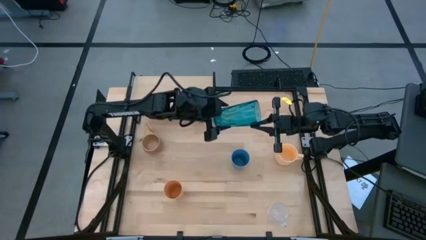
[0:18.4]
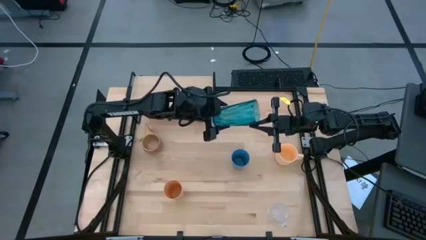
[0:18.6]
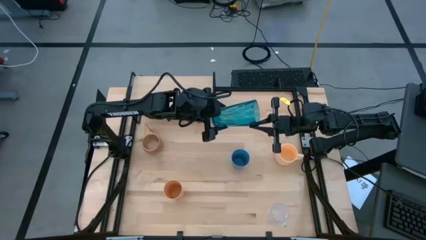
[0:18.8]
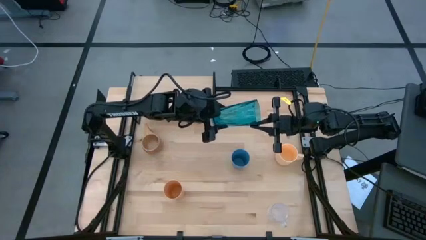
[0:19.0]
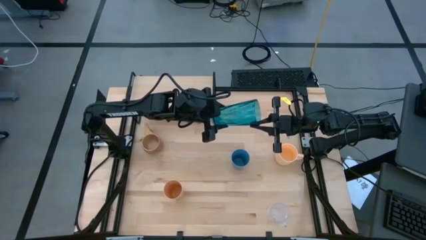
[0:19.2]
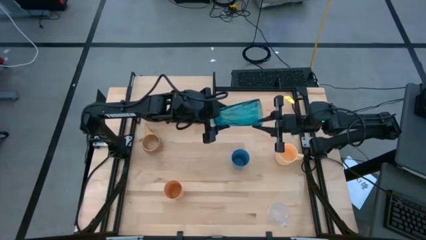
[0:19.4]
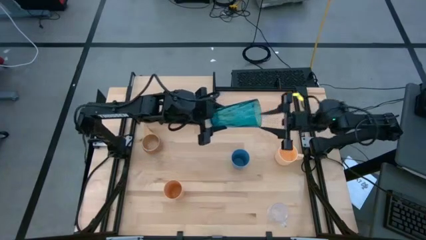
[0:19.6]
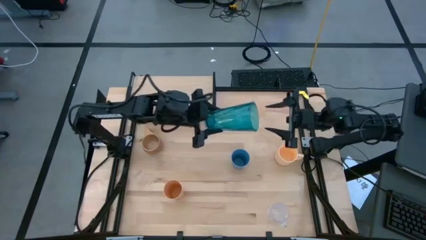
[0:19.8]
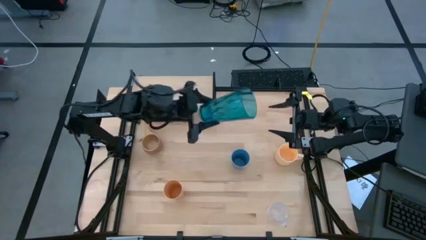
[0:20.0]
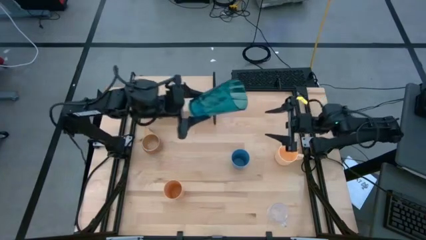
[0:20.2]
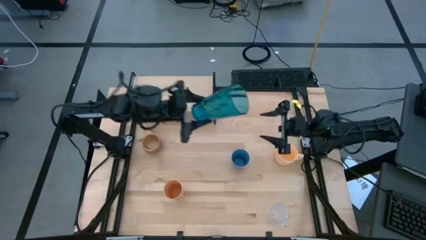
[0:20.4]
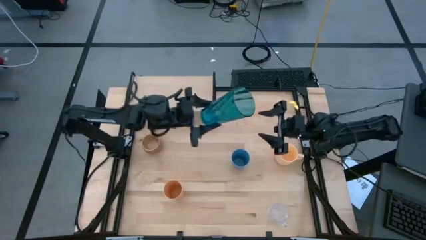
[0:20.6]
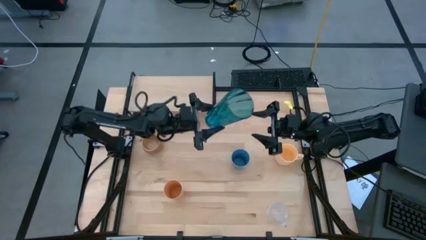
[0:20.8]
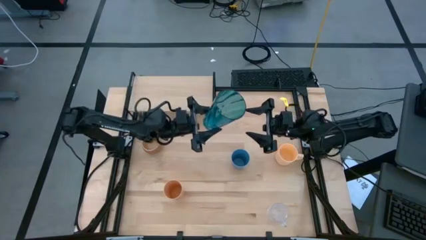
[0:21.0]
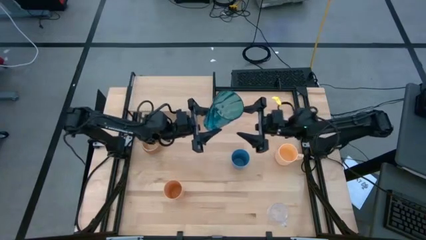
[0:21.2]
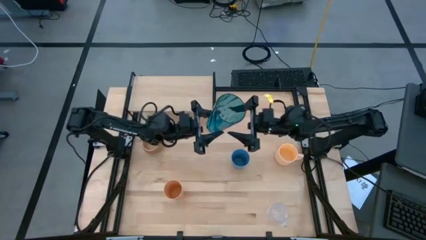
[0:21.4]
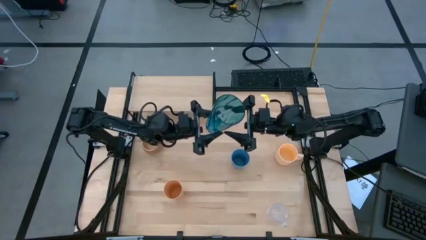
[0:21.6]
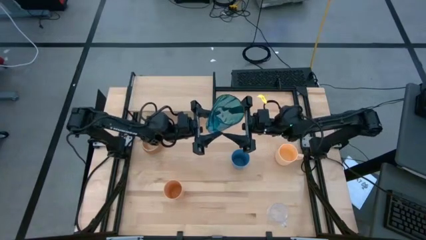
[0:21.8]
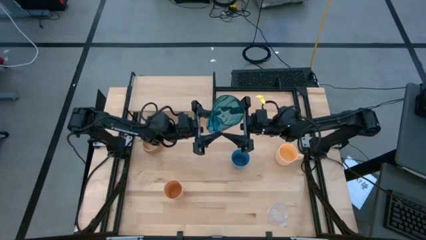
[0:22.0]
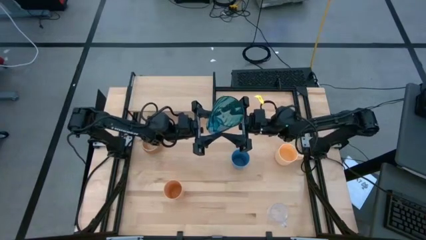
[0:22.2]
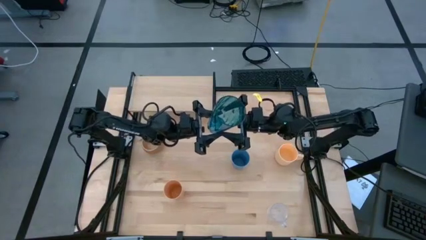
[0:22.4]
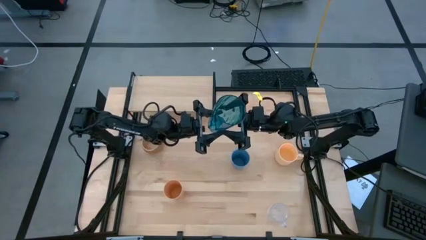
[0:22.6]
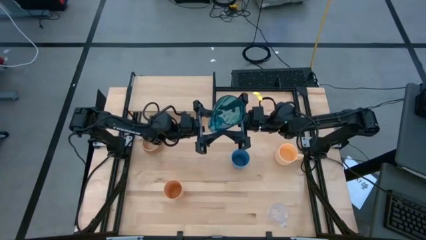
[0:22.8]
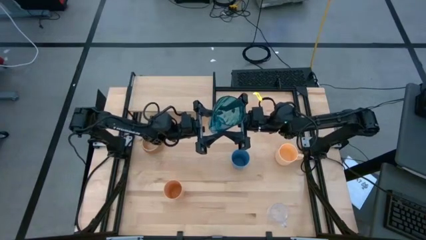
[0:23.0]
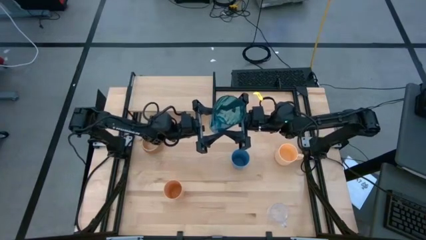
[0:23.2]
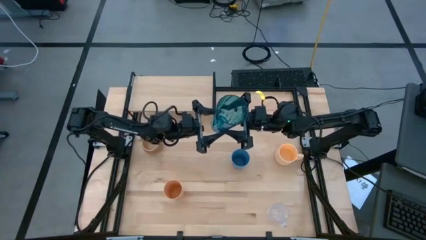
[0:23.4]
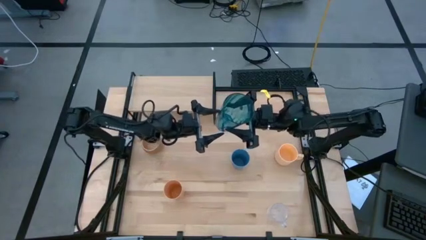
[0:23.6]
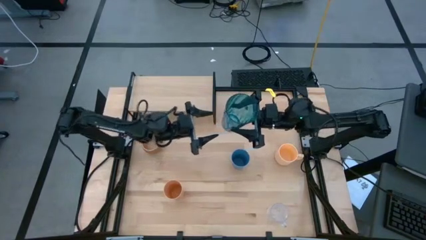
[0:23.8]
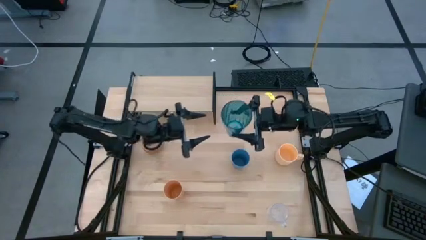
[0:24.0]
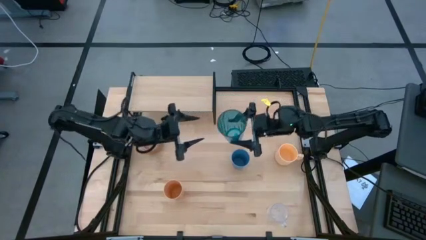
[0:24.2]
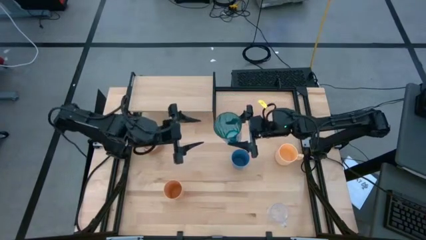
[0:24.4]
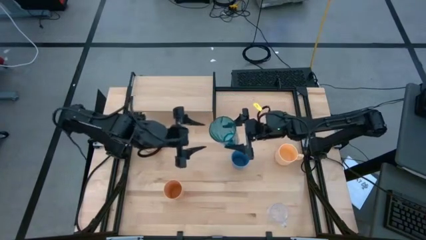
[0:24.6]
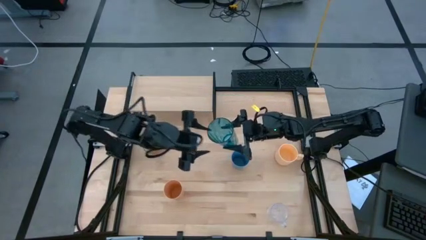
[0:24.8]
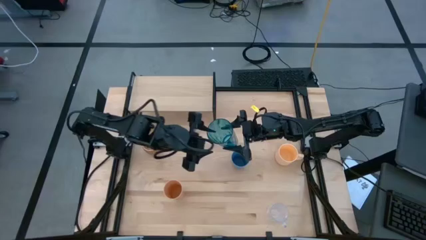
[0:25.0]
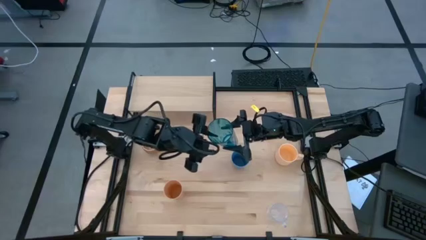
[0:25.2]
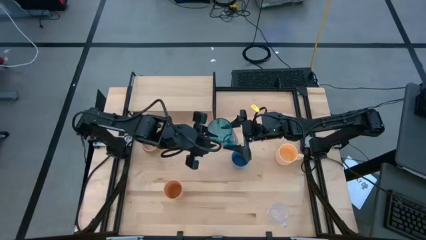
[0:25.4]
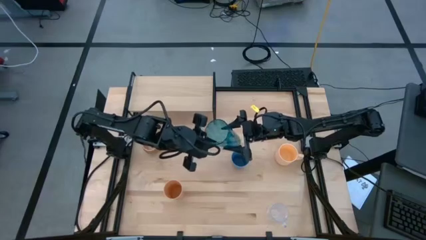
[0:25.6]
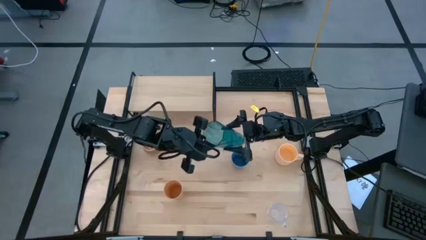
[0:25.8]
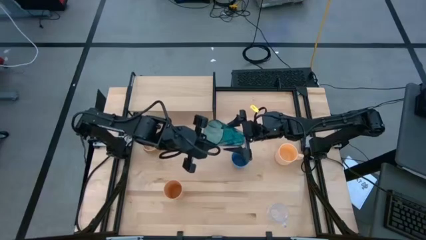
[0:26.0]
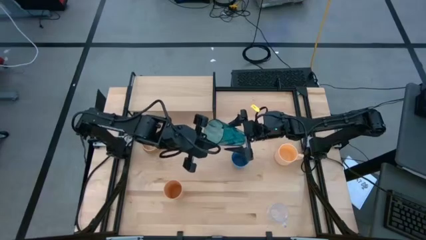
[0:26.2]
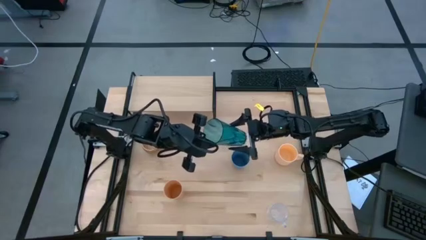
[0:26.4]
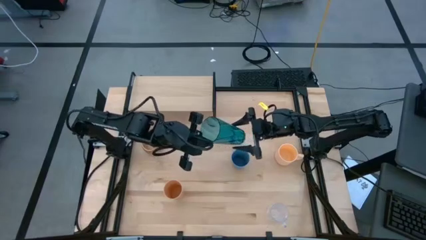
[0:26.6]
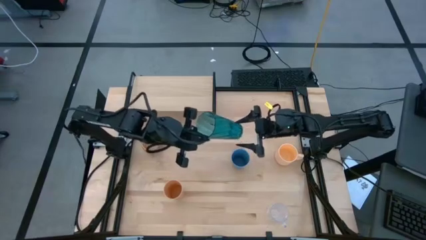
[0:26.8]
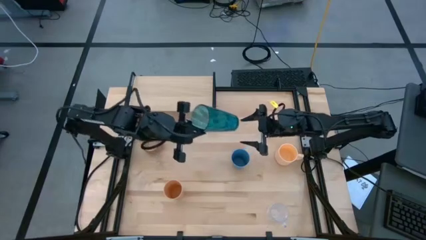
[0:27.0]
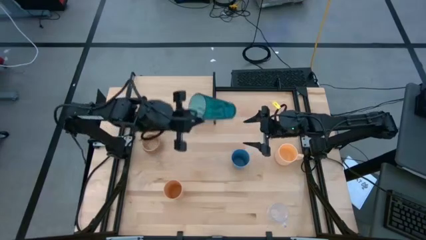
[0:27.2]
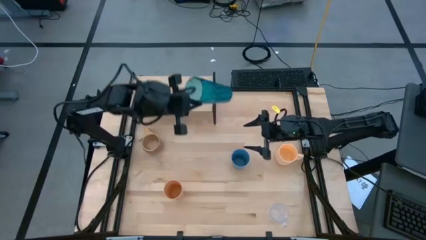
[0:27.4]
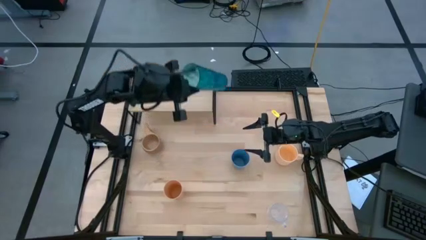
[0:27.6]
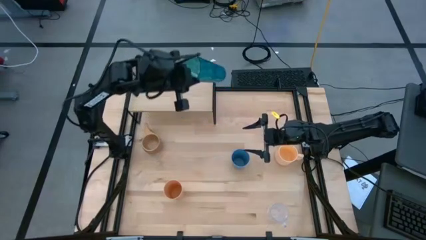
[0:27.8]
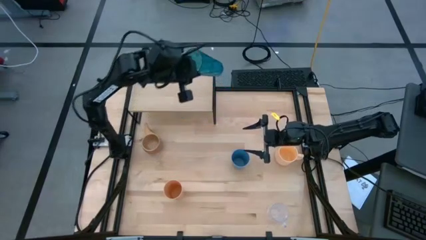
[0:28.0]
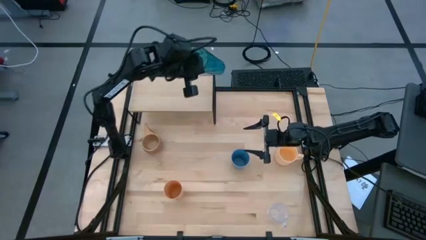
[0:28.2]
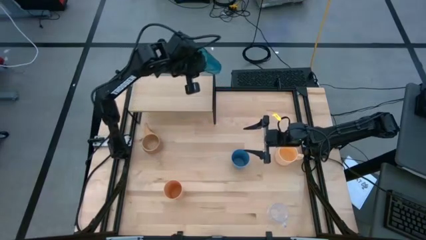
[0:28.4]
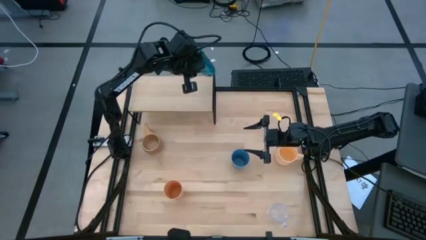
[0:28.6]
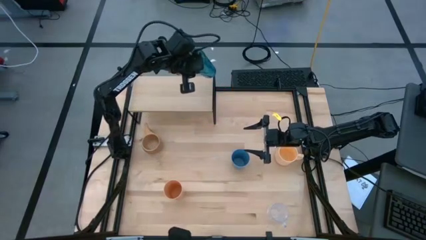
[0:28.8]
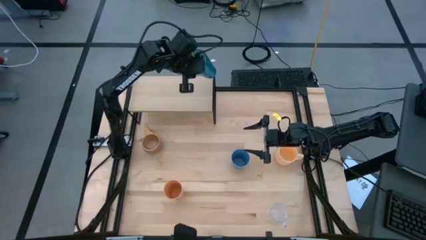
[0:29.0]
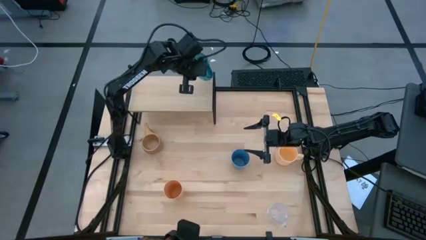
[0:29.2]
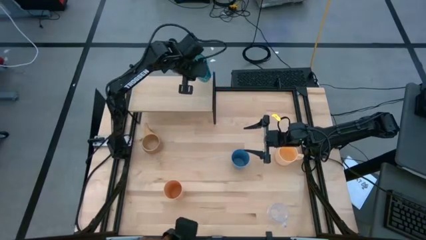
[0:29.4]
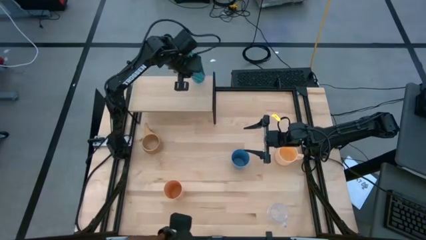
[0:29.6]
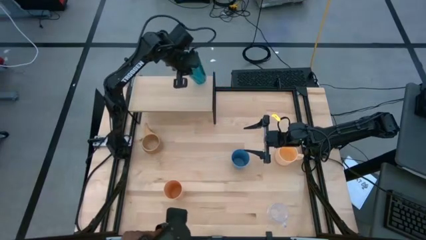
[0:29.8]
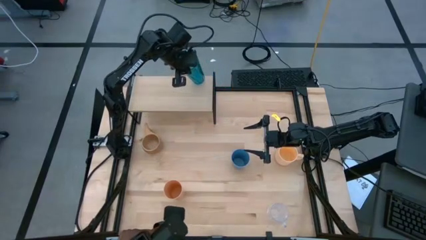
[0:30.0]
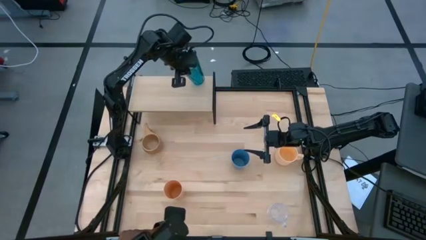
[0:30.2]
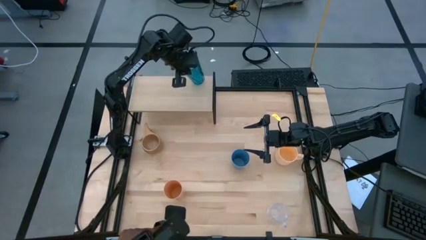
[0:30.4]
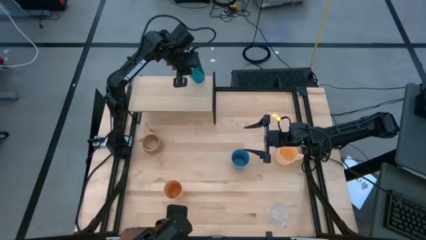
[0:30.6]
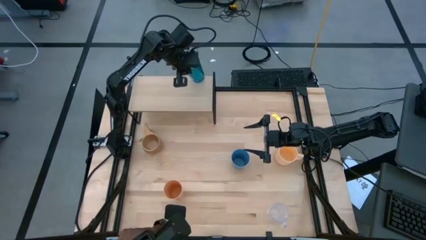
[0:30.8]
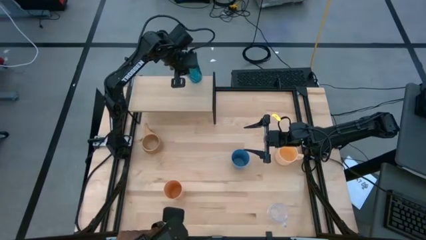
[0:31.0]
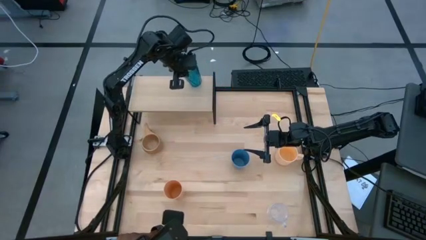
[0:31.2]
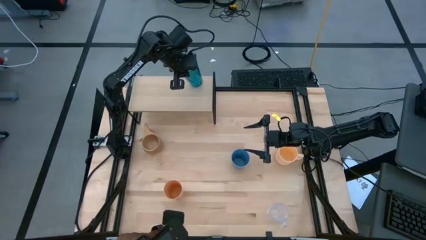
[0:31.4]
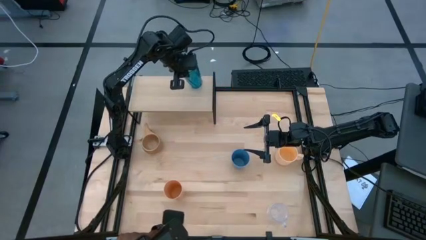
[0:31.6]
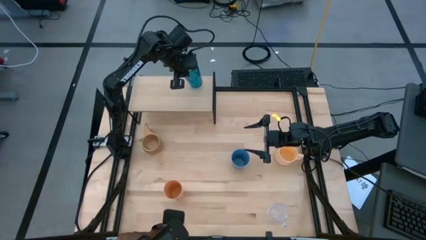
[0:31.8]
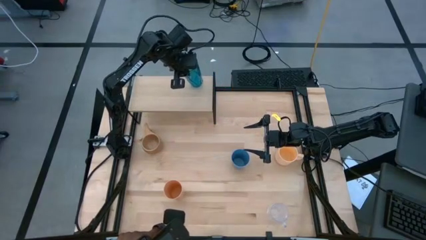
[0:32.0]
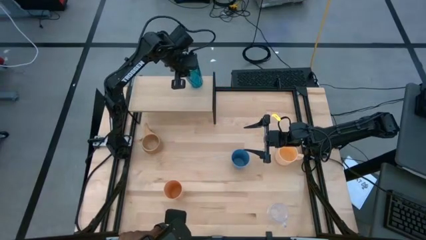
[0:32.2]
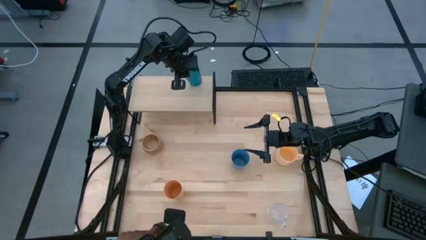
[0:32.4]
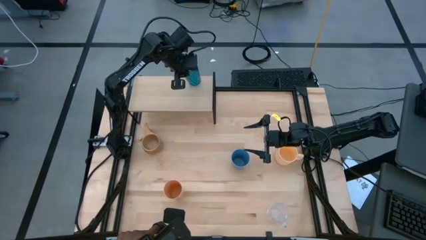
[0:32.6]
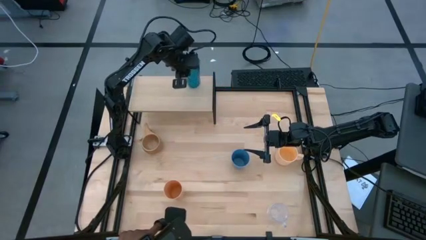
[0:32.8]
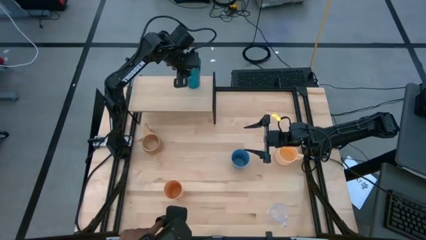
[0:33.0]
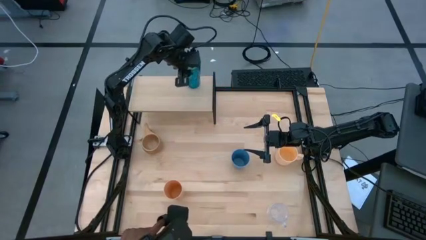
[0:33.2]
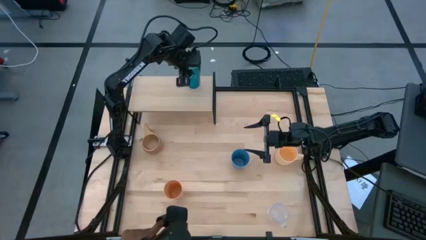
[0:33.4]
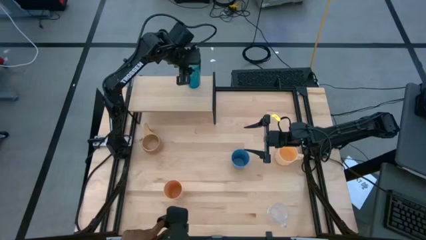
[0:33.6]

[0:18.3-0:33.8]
Task: Stack small to large cups/mugs on shelf
Put the light blue cup on the shelf
